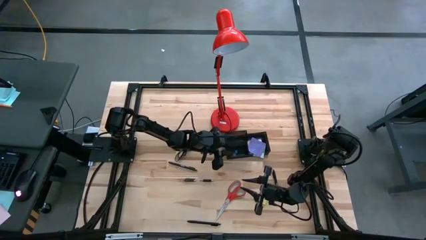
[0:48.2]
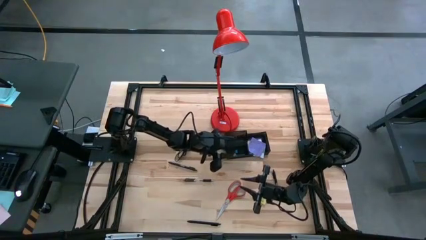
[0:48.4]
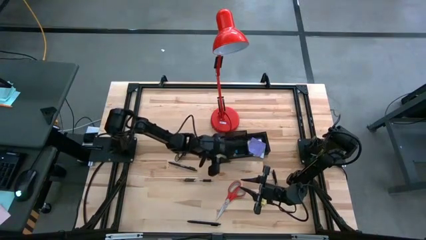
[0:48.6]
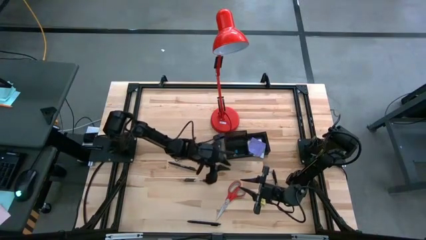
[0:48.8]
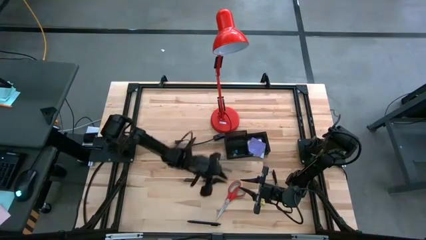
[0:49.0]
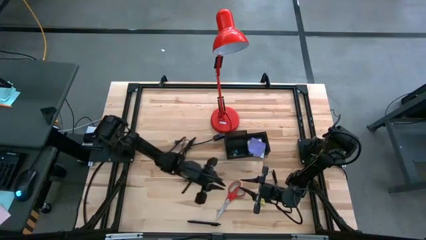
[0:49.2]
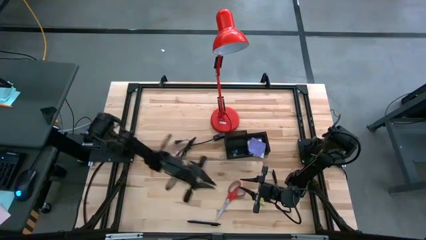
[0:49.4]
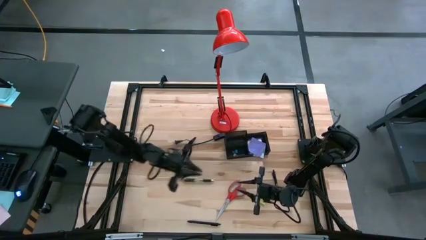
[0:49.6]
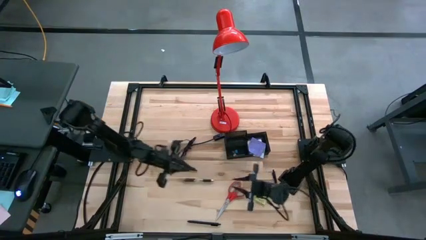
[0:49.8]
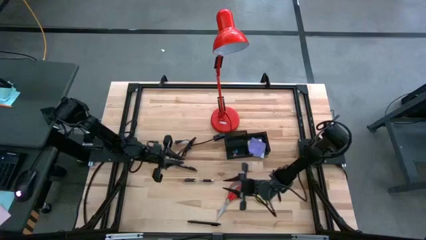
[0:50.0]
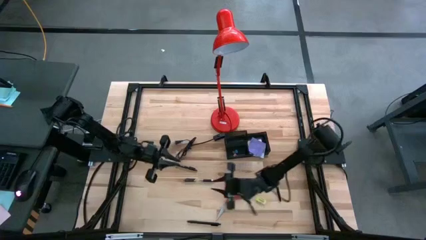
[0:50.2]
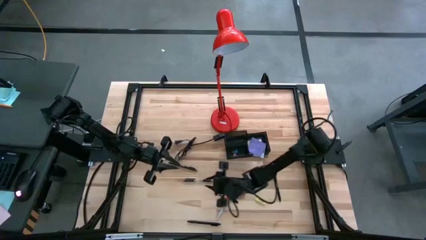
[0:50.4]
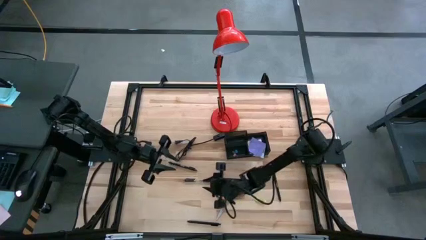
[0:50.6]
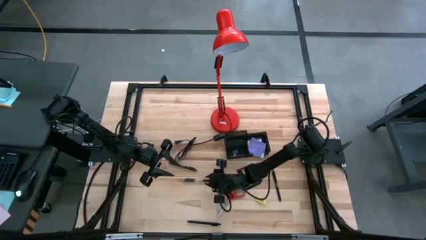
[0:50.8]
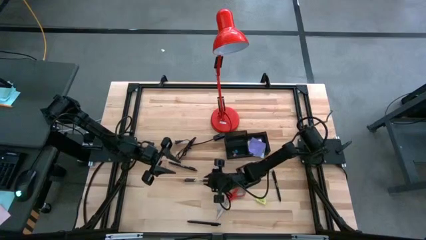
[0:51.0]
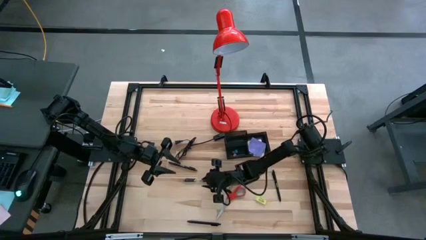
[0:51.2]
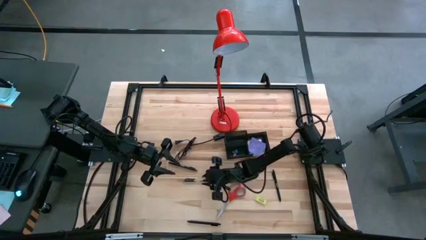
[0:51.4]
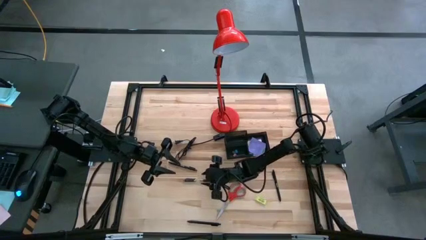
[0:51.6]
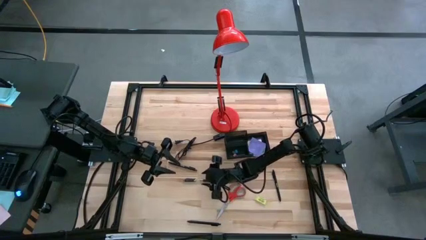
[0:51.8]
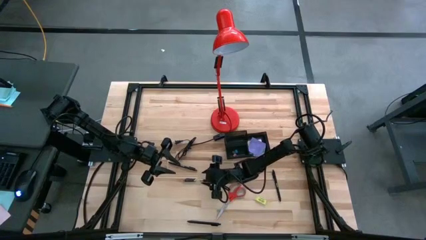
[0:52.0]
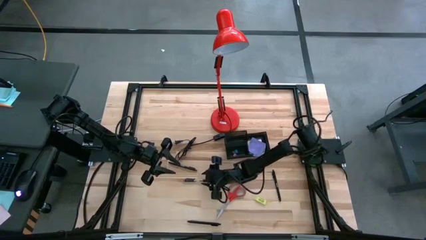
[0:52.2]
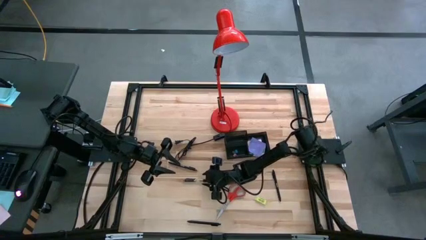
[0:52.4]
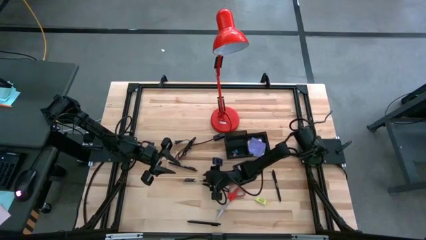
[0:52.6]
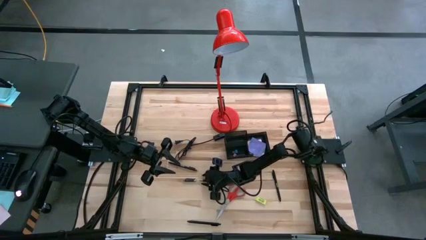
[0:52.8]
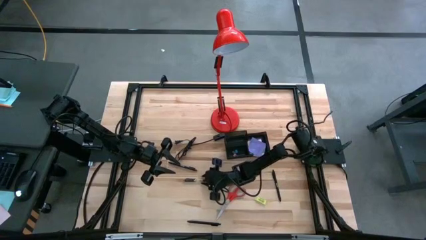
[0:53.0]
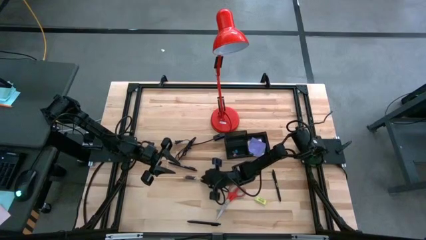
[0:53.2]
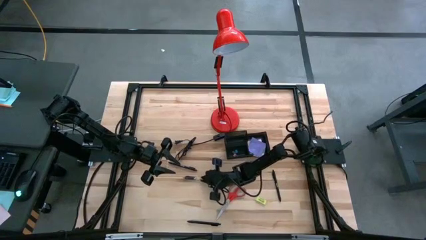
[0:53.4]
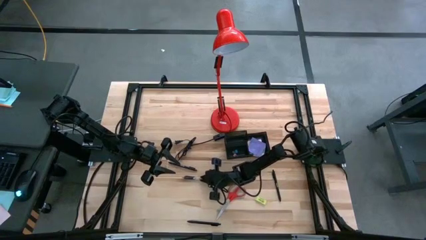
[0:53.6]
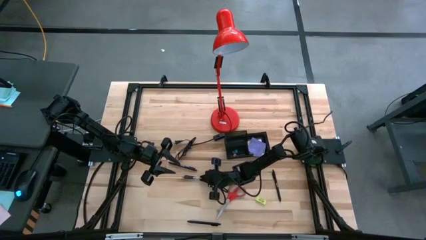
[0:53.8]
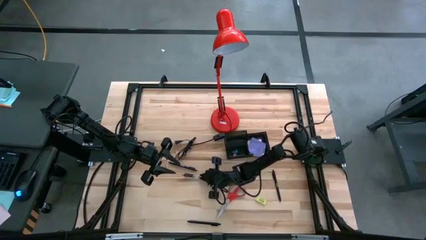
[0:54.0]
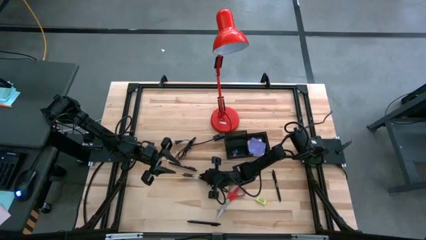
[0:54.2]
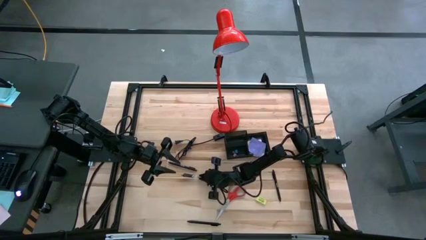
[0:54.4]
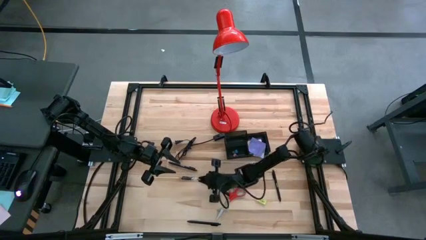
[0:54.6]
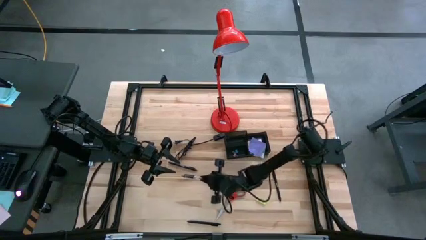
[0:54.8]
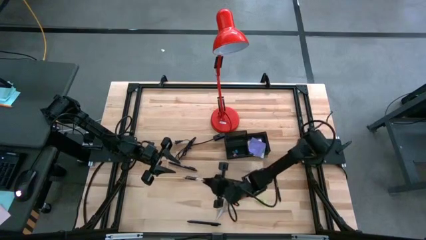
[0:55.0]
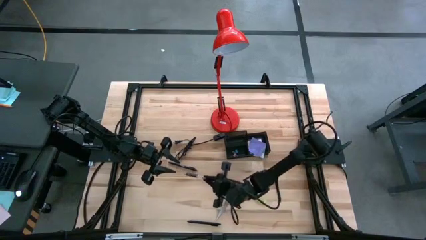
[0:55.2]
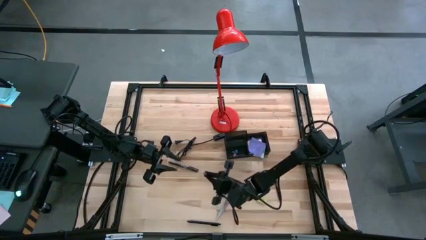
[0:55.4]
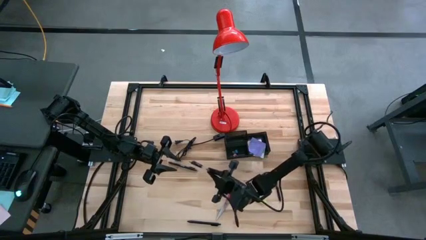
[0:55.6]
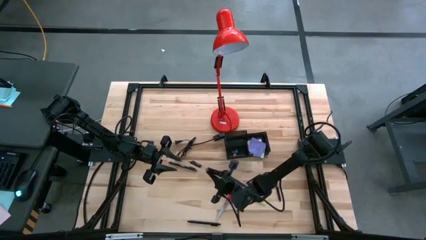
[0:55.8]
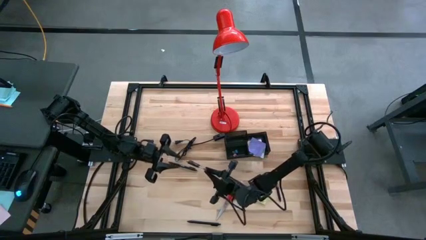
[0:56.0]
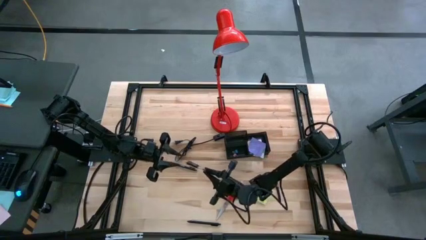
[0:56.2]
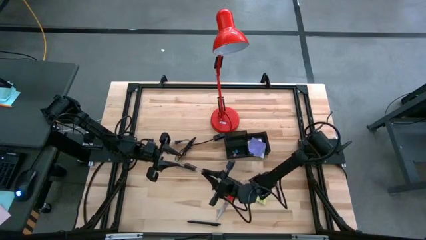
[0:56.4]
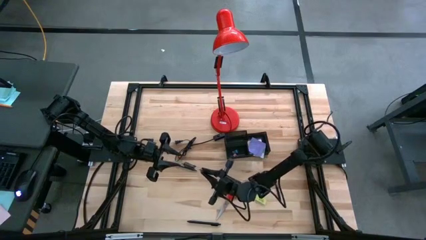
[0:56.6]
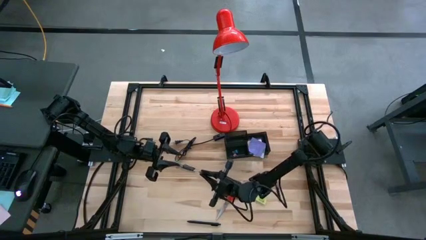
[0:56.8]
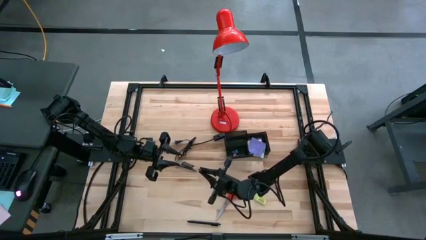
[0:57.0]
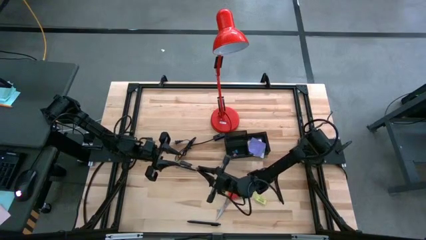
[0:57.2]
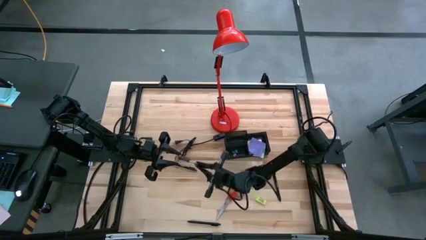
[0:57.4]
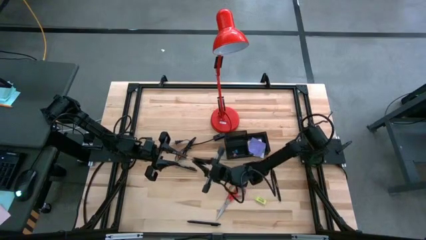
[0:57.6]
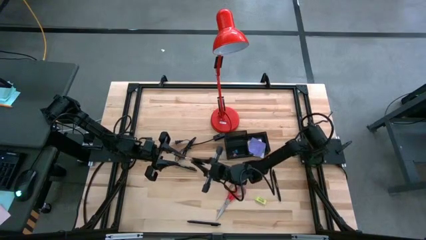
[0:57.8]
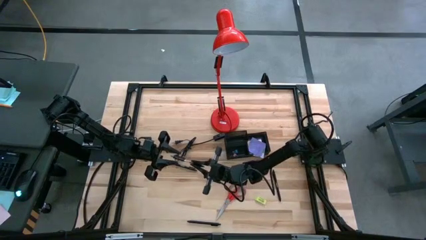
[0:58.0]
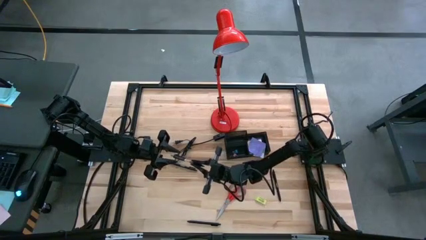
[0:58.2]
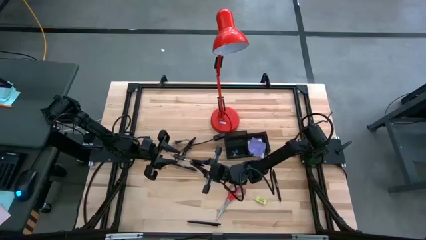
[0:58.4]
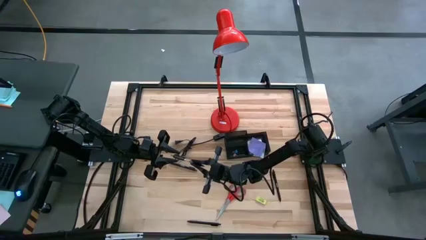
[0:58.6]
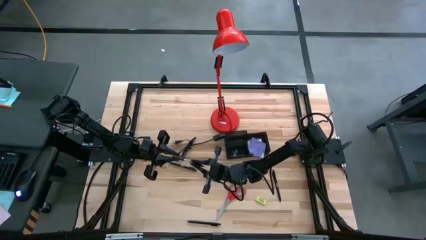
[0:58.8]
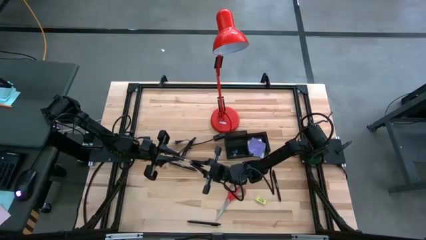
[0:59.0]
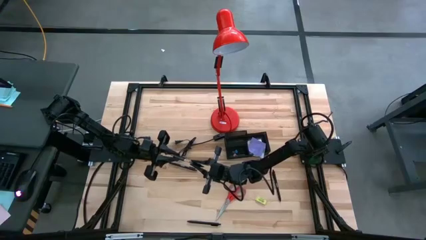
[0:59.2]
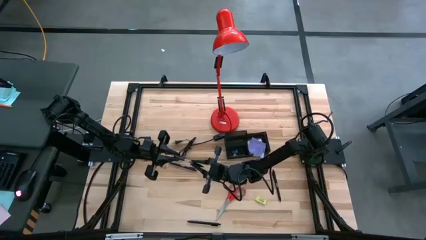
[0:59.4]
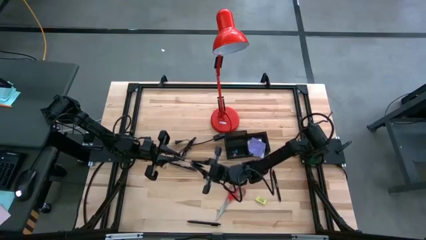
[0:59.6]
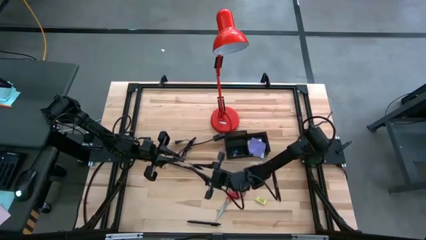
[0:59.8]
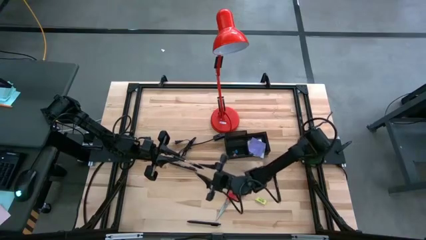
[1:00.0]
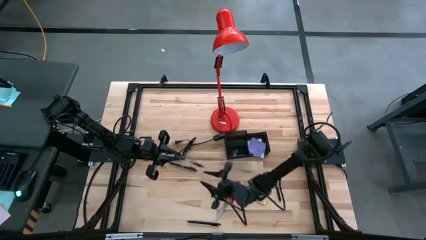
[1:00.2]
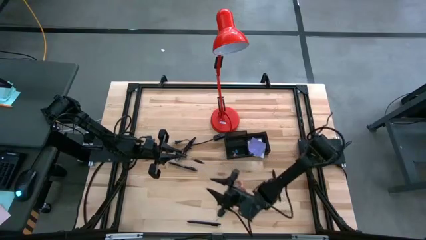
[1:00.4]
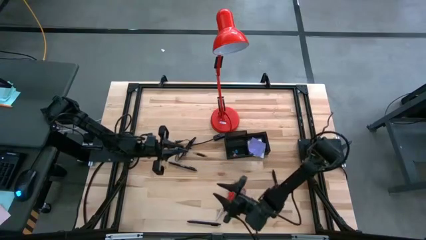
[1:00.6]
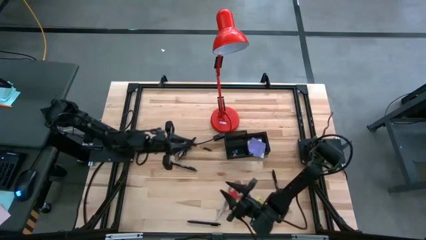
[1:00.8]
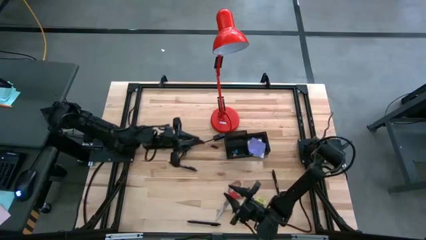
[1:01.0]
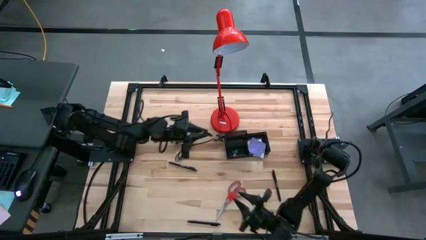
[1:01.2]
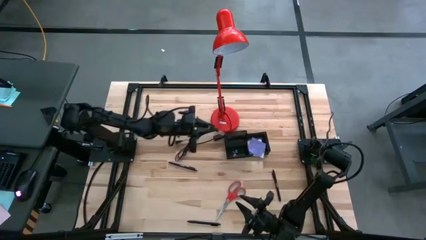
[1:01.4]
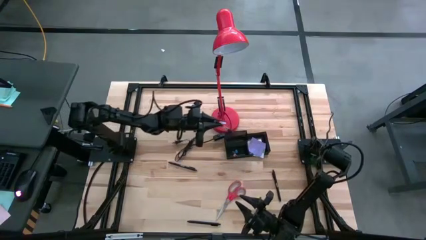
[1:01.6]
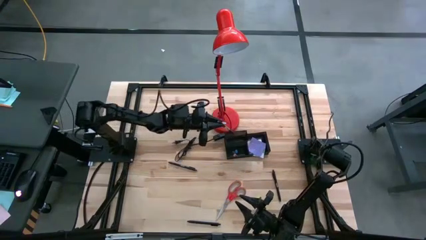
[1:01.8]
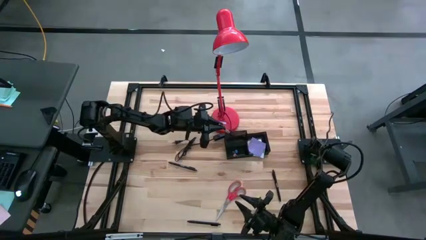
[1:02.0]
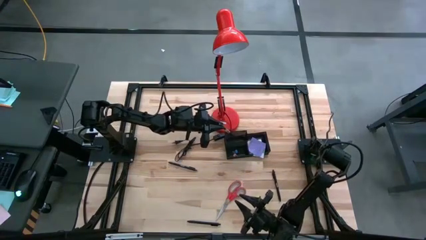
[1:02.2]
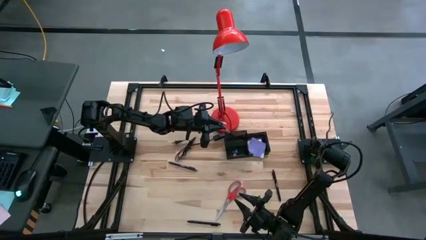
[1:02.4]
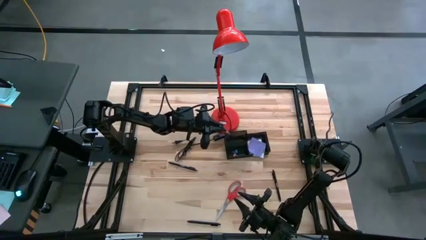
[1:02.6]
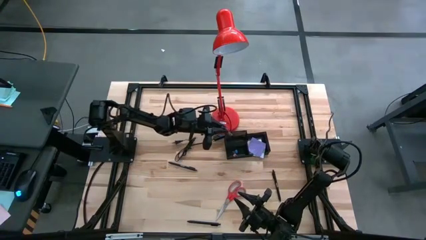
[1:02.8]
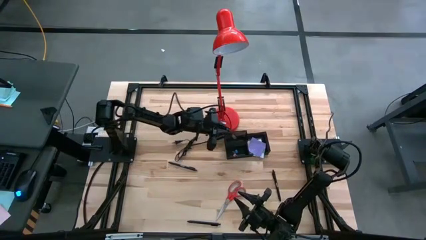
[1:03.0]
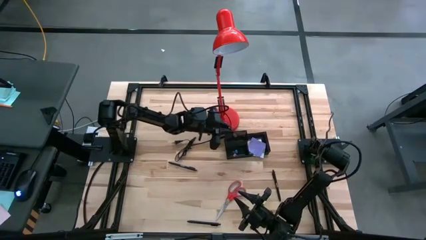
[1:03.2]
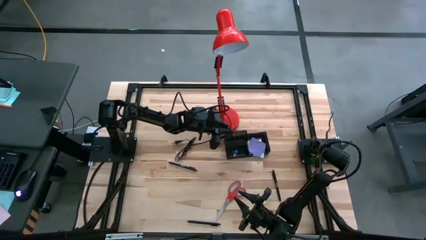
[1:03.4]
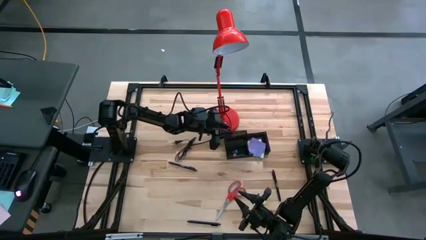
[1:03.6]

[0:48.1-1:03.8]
Task: Pick and place office supplies into organizer
Put the black pen into the desk organizer
